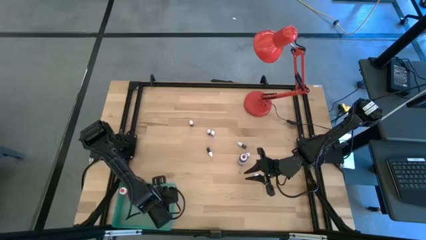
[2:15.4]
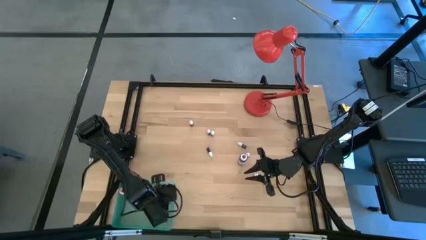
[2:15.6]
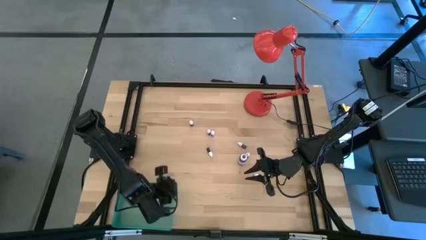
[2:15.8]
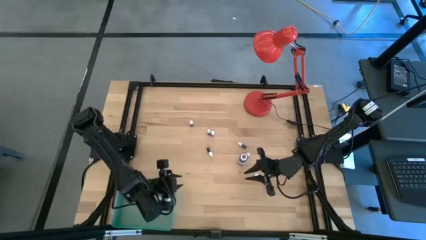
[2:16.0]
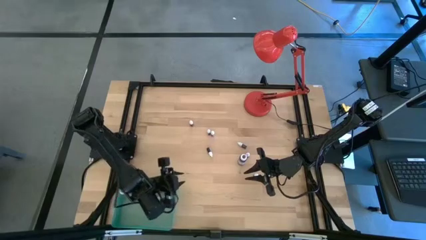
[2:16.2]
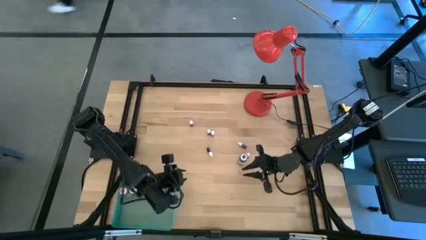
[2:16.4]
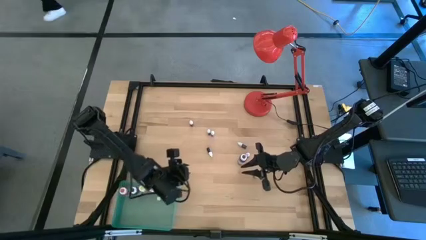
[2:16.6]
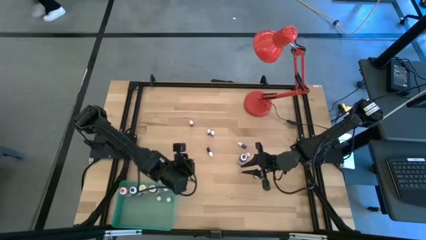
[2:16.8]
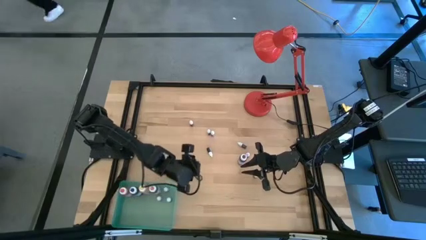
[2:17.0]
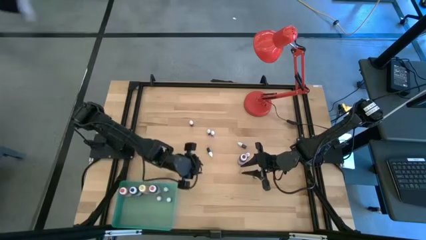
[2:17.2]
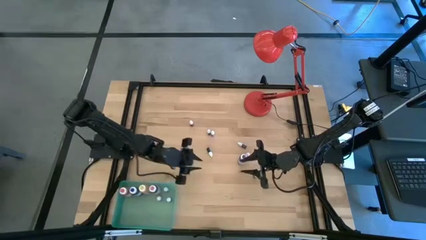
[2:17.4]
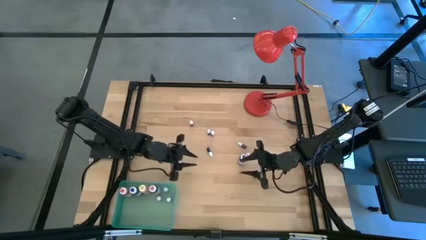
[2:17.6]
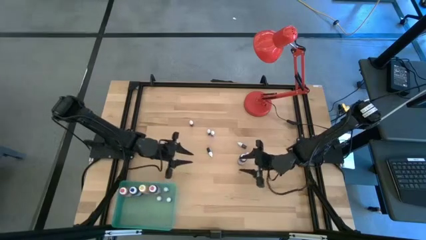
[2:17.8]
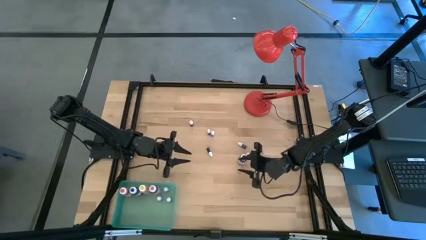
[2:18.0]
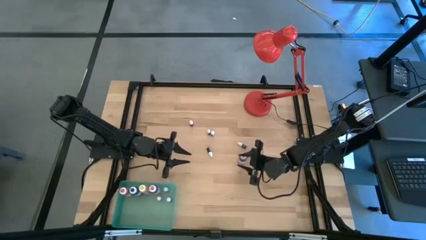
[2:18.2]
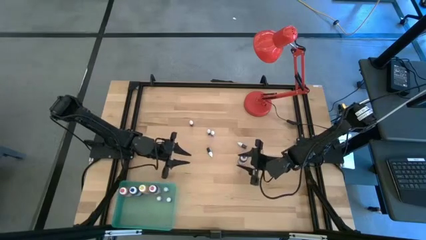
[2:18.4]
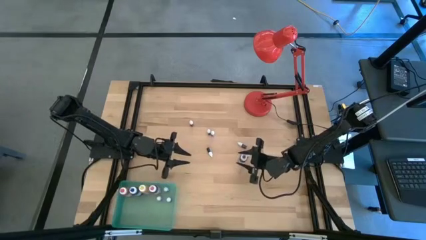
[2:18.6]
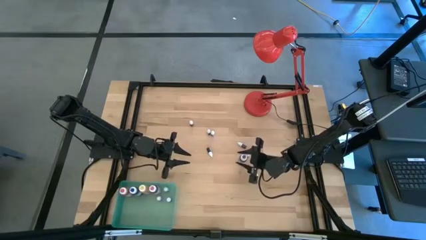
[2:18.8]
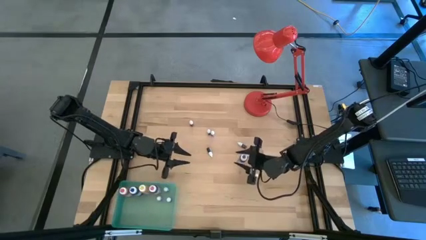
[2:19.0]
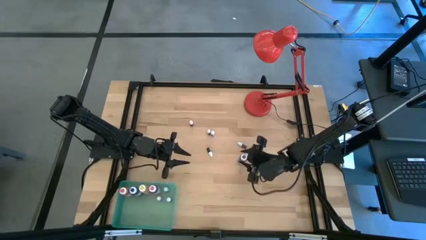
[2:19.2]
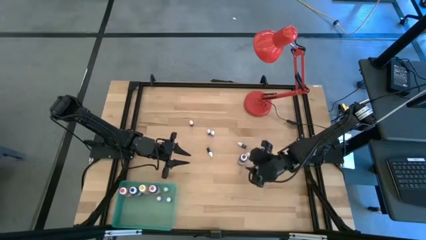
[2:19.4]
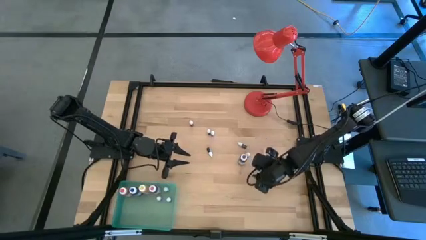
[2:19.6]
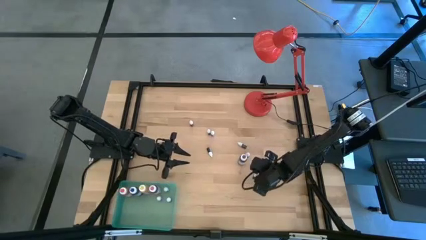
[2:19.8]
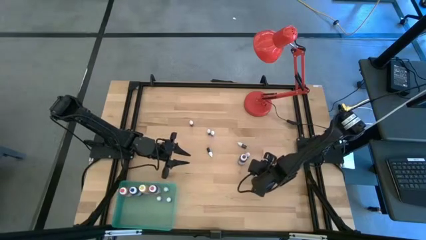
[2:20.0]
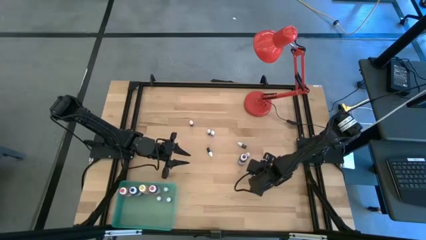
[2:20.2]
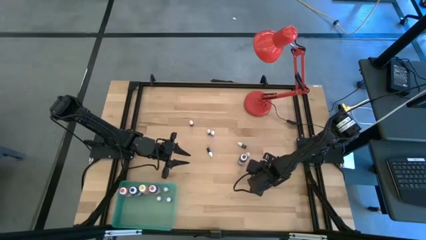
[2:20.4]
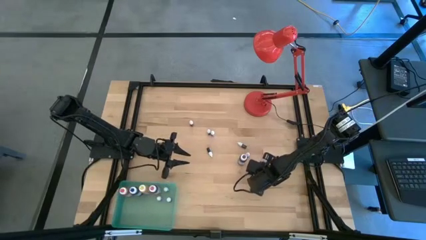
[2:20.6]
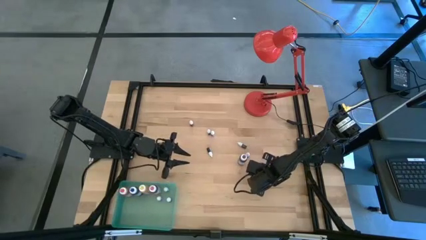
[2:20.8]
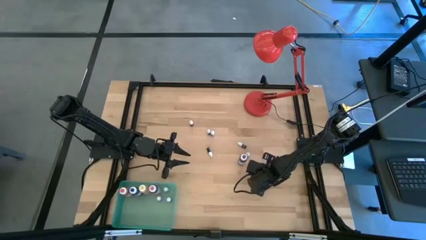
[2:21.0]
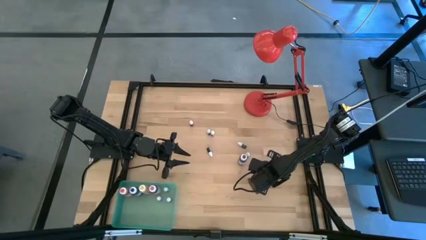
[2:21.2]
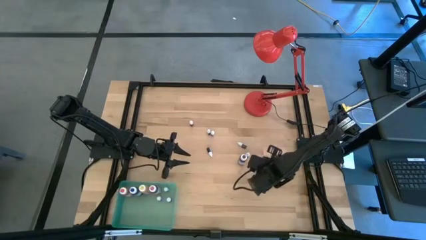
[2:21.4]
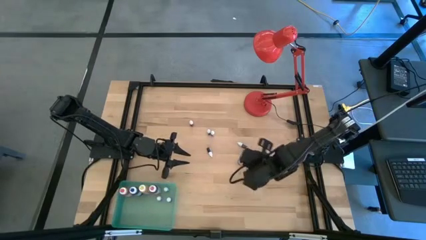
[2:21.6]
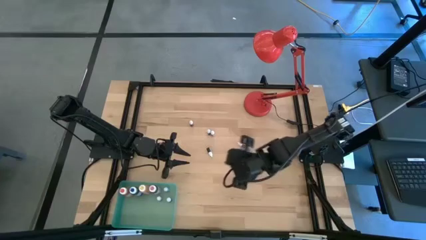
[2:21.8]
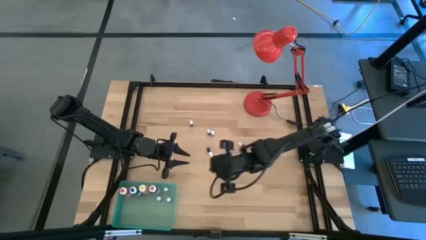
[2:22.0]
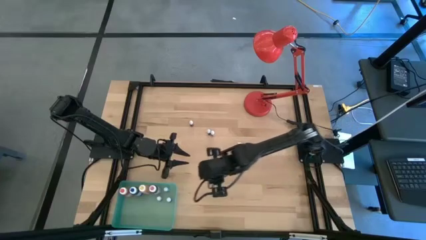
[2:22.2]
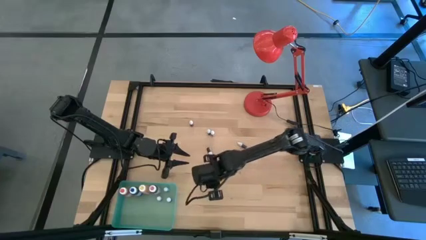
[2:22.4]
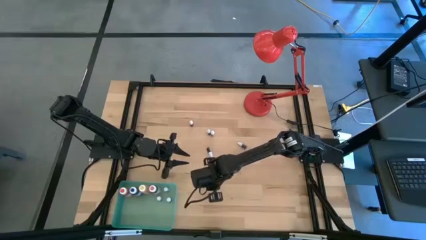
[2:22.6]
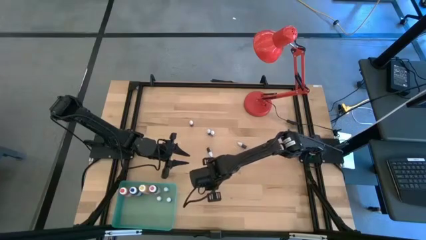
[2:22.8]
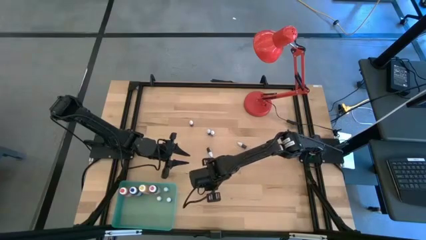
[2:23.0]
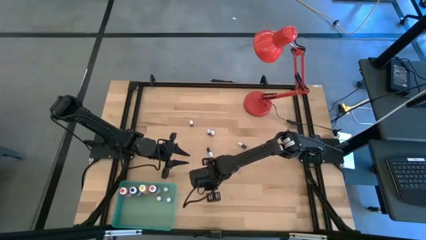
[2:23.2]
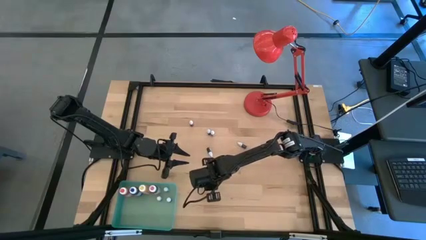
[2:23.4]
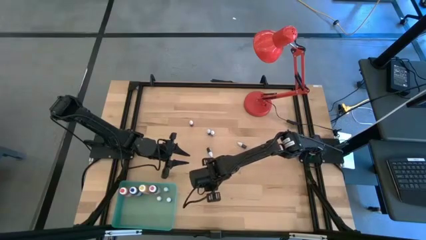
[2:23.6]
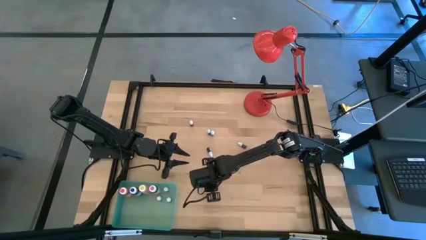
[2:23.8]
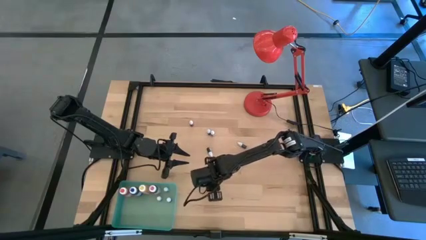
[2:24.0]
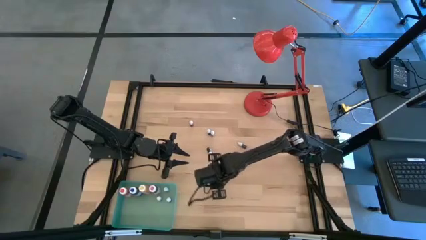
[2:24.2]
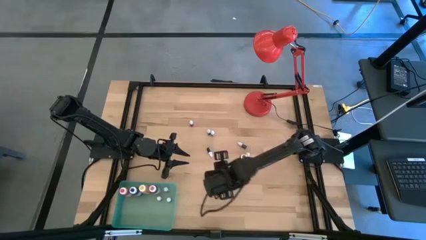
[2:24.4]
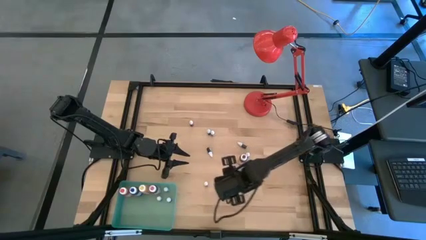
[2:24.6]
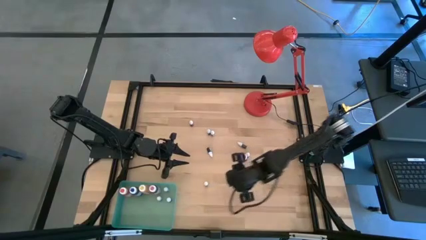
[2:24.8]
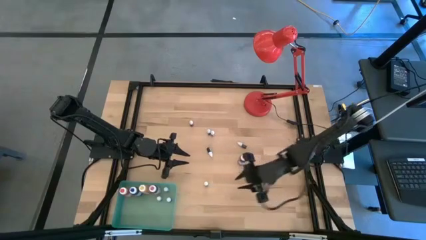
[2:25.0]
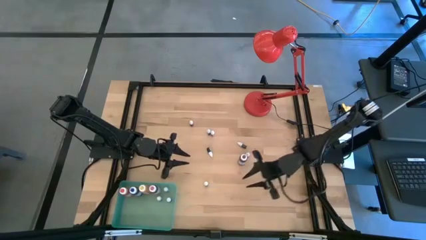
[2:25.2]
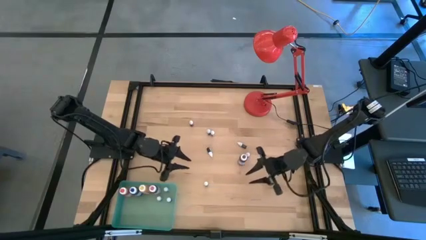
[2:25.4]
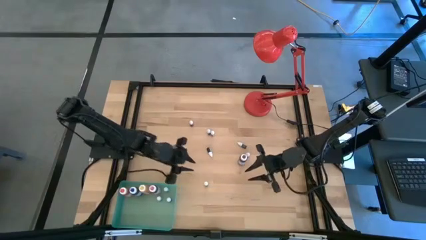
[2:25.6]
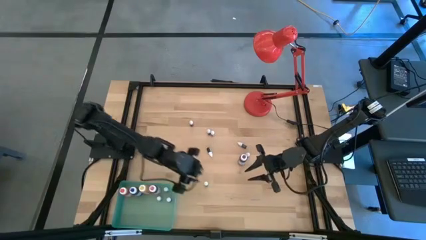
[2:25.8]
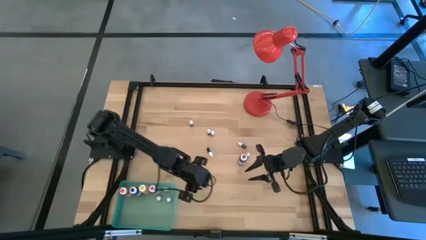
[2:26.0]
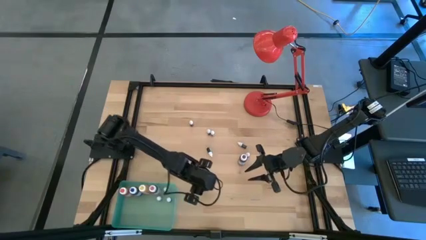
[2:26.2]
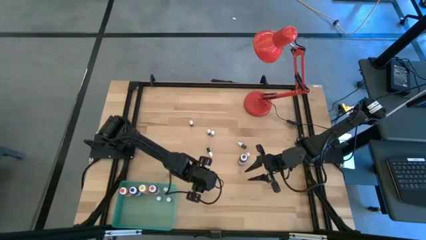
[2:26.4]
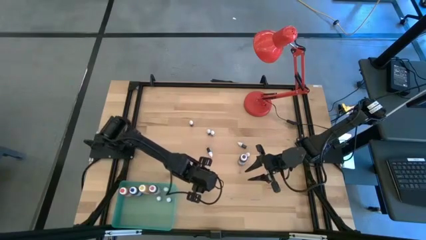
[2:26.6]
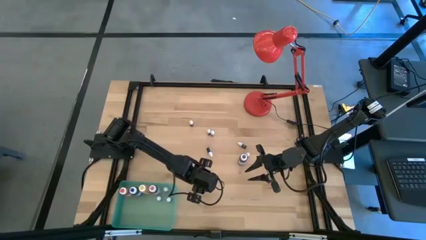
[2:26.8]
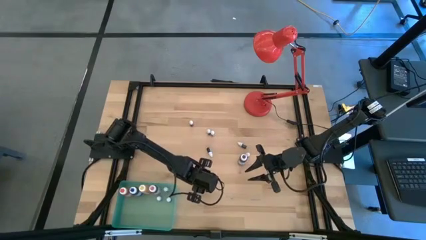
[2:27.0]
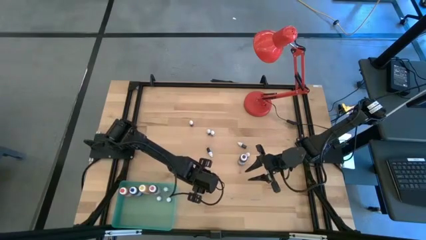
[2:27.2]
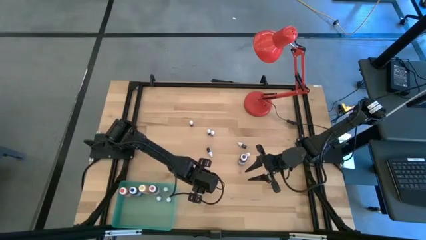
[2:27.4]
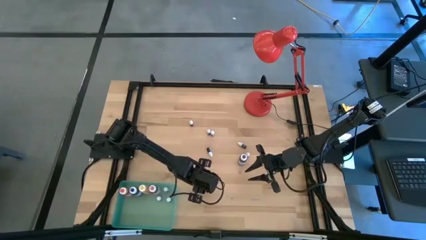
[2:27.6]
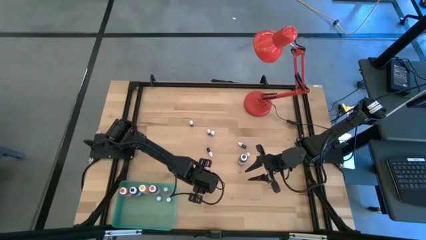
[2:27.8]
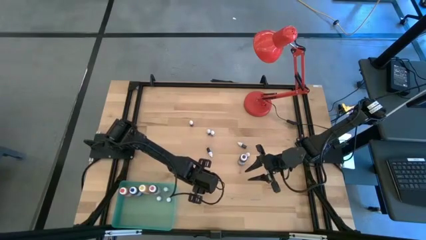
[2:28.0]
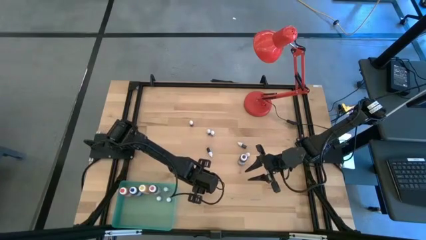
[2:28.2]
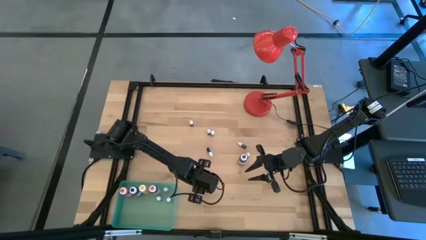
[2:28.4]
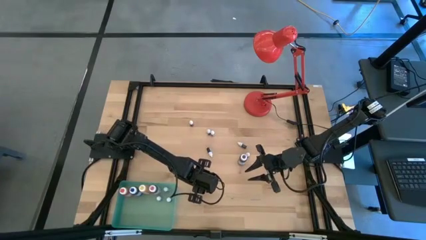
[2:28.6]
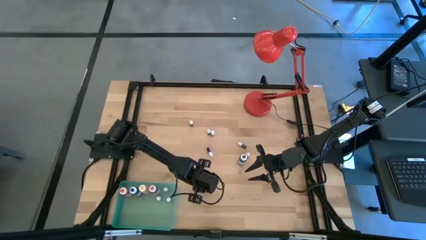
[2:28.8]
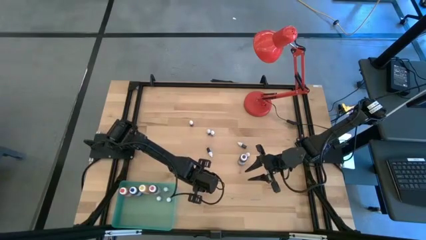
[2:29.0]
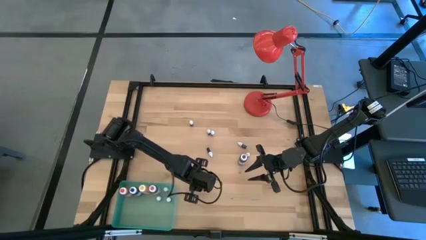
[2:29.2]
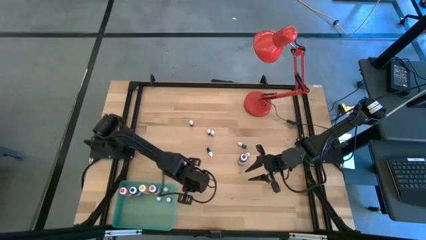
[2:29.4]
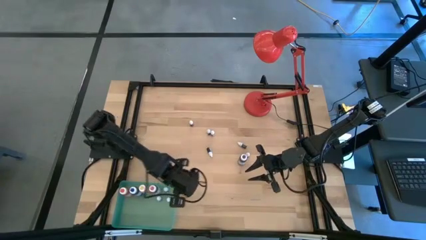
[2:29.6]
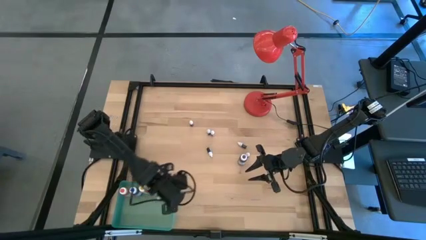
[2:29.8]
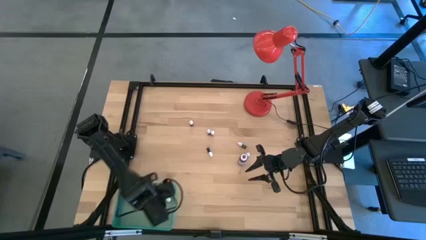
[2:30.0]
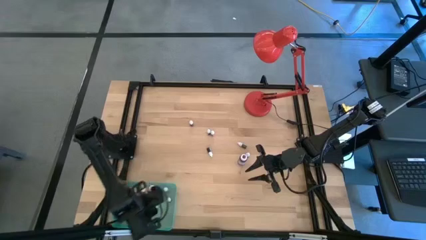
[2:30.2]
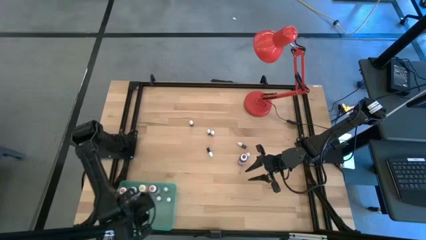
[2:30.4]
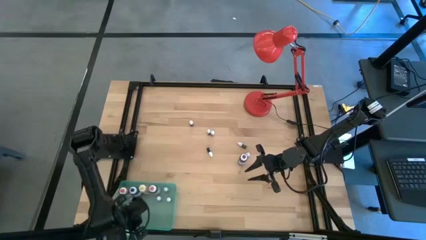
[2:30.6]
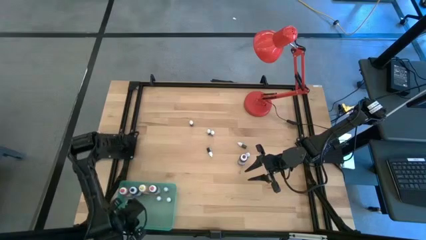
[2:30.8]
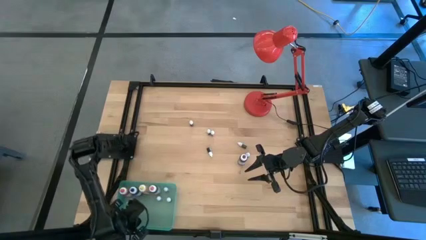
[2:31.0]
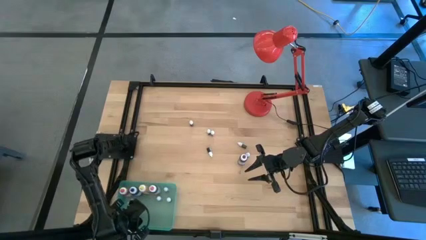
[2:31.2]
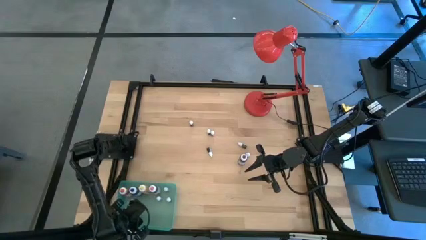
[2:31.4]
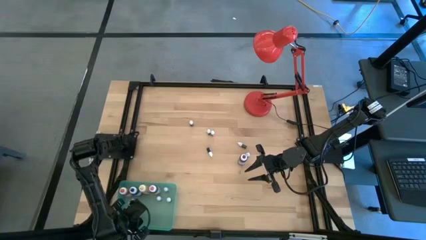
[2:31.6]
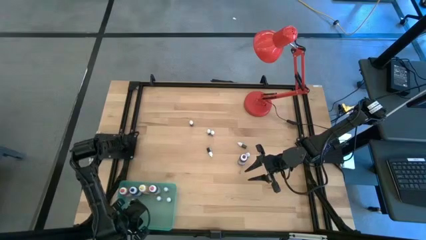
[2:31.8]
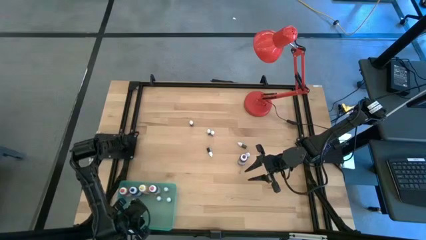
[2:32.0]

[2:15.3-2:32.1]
Task: Pick & Place food coloring
Put the black food coloring into the blue bin
